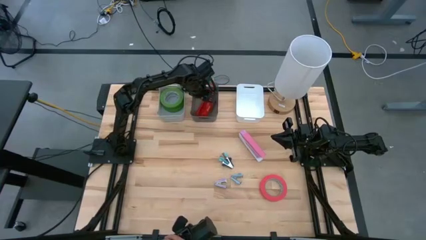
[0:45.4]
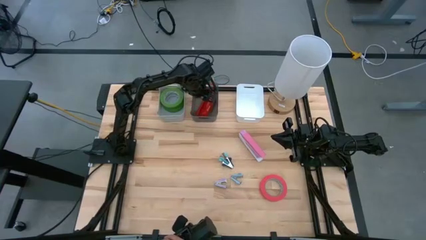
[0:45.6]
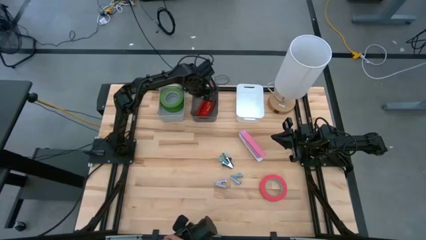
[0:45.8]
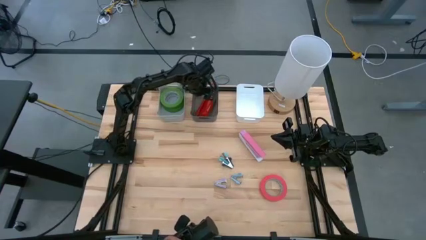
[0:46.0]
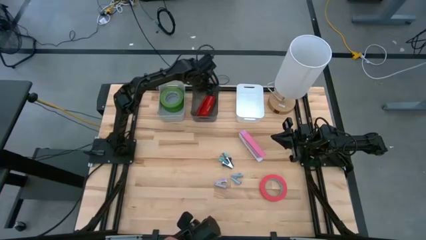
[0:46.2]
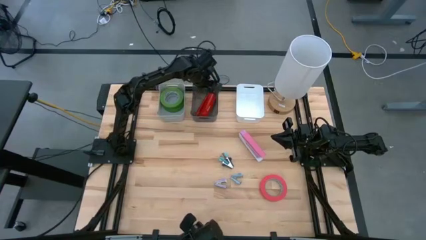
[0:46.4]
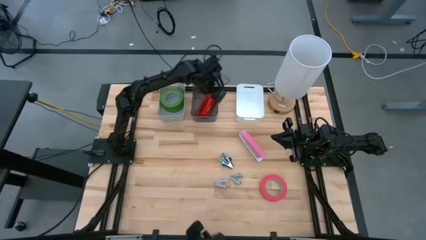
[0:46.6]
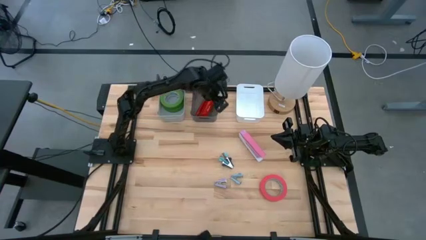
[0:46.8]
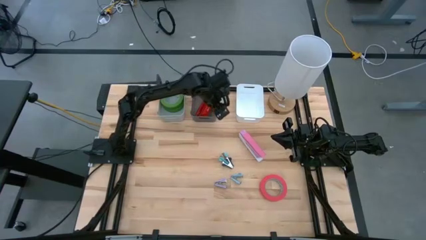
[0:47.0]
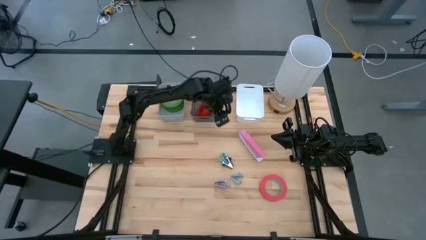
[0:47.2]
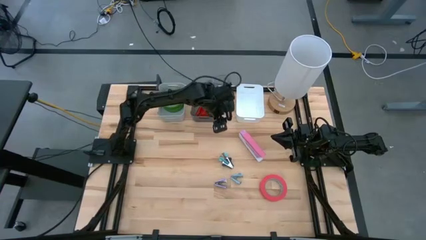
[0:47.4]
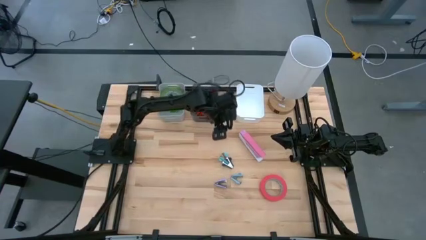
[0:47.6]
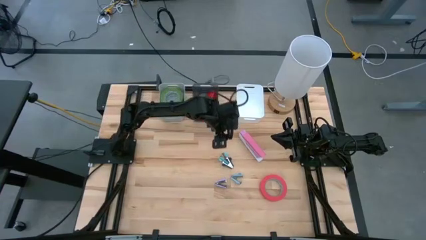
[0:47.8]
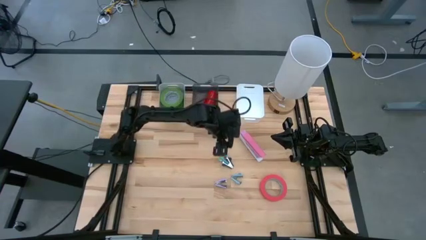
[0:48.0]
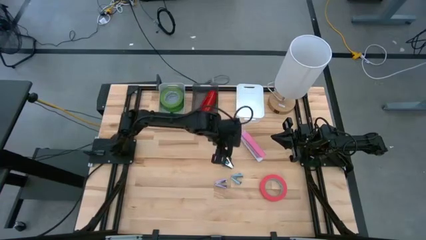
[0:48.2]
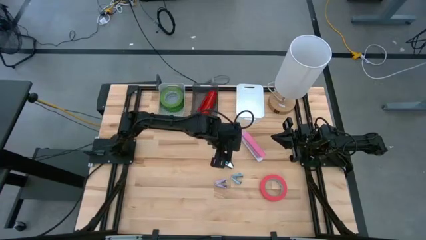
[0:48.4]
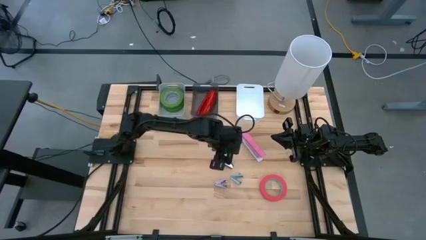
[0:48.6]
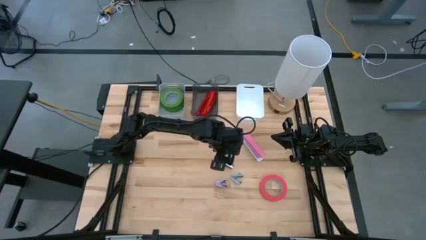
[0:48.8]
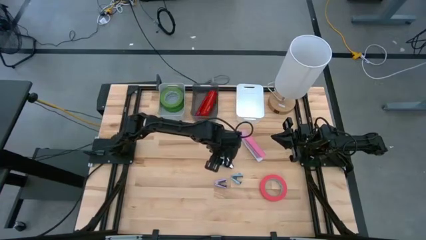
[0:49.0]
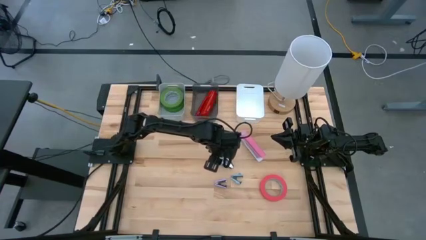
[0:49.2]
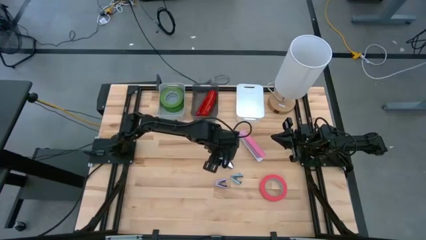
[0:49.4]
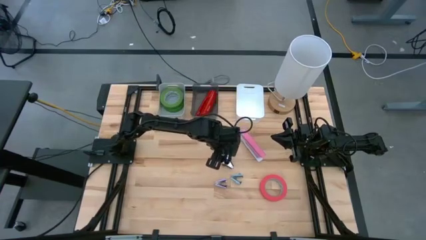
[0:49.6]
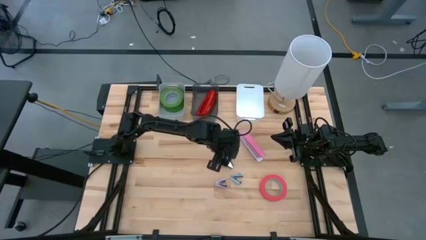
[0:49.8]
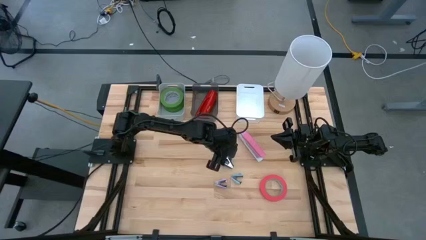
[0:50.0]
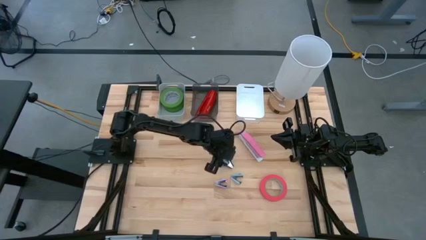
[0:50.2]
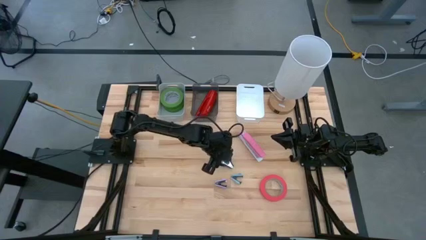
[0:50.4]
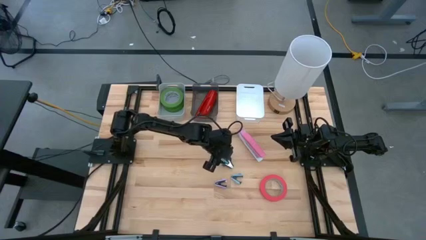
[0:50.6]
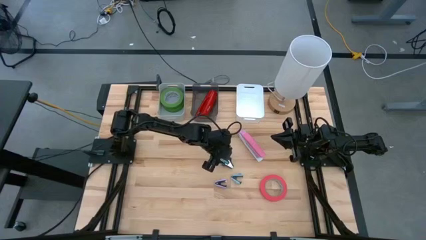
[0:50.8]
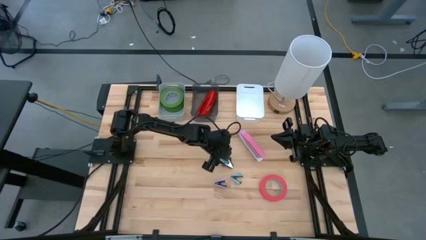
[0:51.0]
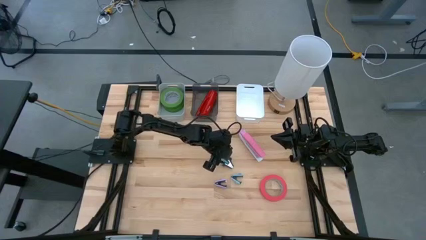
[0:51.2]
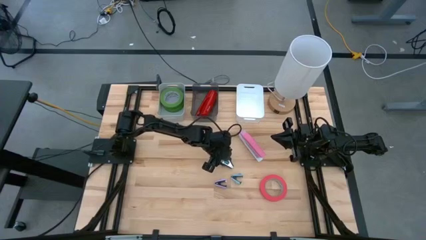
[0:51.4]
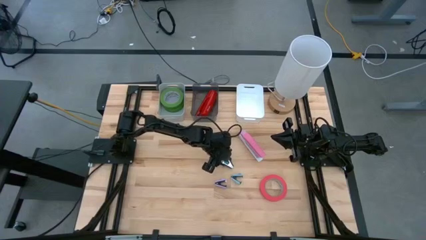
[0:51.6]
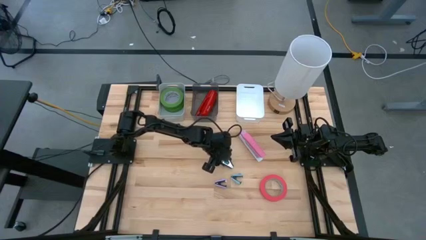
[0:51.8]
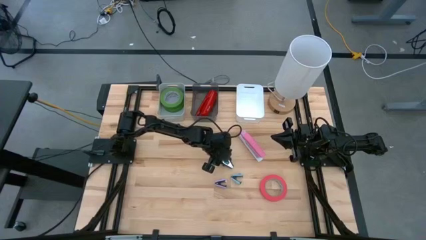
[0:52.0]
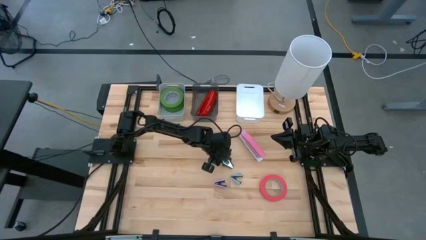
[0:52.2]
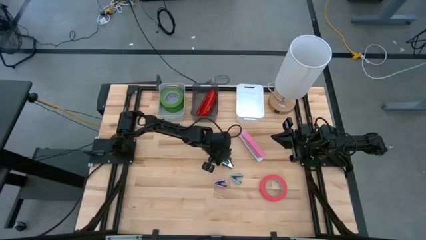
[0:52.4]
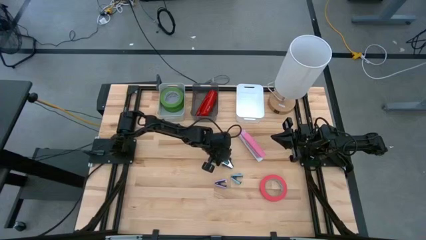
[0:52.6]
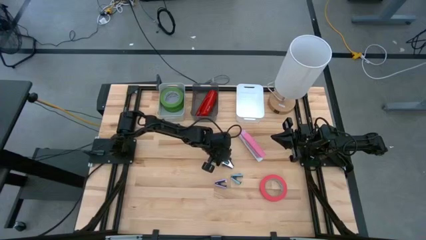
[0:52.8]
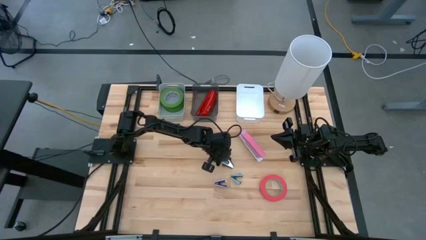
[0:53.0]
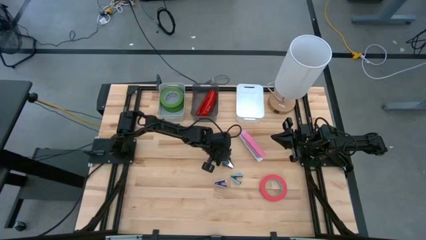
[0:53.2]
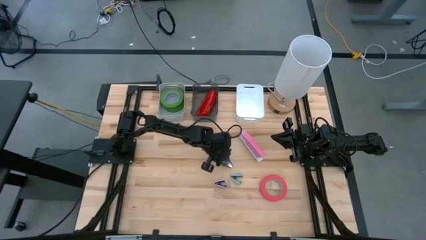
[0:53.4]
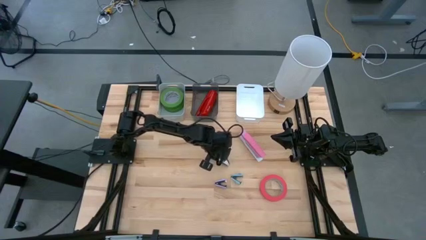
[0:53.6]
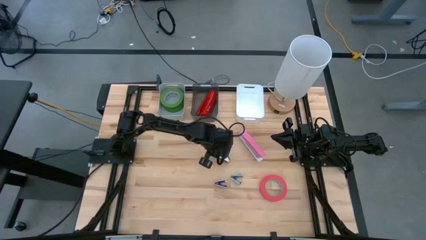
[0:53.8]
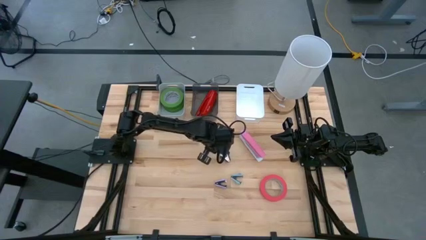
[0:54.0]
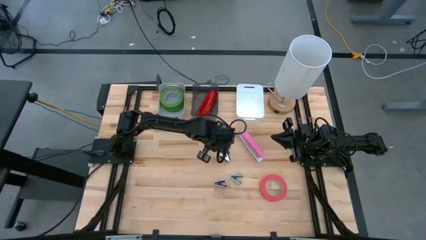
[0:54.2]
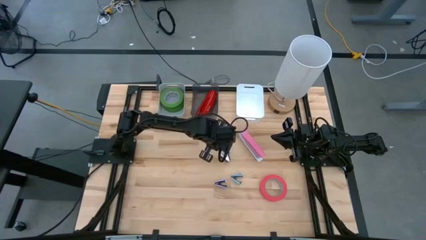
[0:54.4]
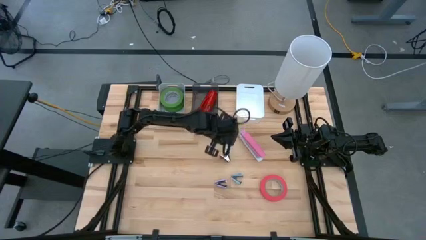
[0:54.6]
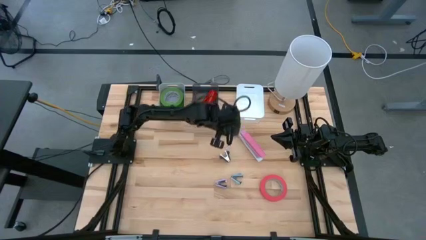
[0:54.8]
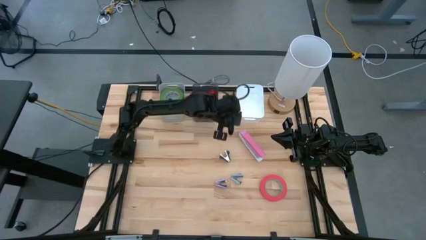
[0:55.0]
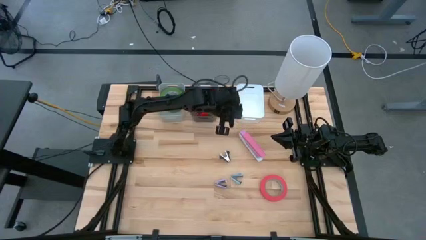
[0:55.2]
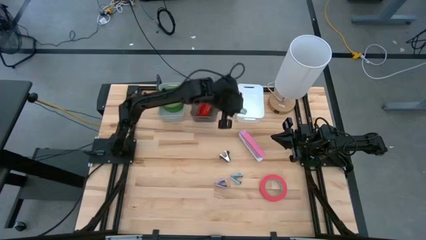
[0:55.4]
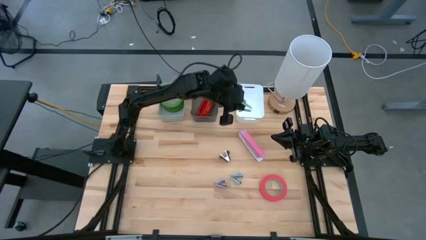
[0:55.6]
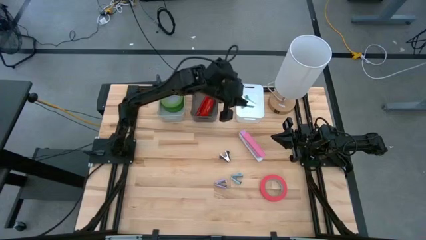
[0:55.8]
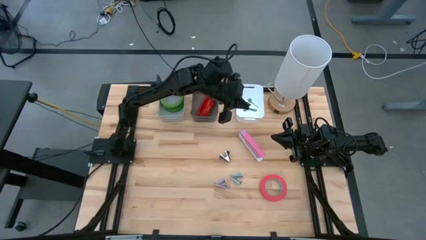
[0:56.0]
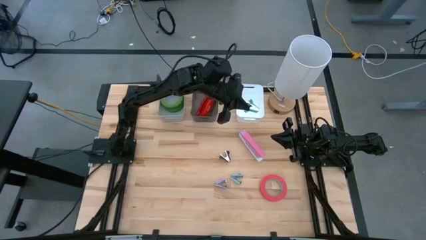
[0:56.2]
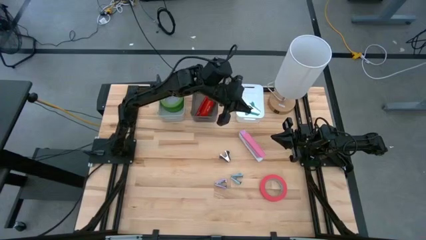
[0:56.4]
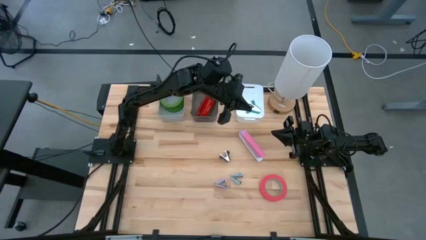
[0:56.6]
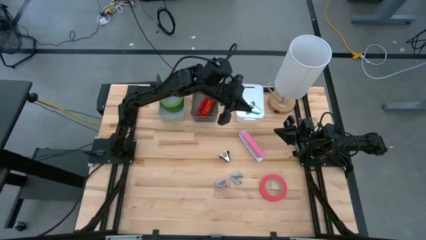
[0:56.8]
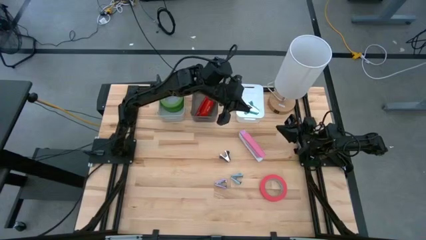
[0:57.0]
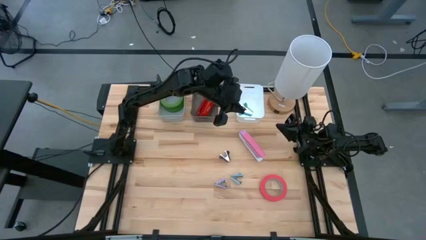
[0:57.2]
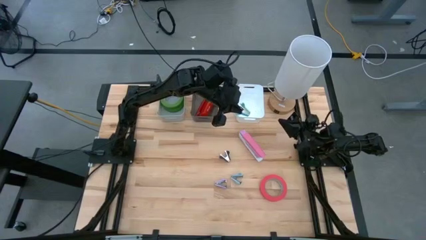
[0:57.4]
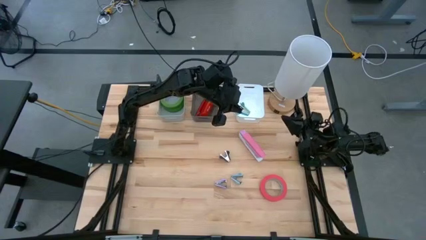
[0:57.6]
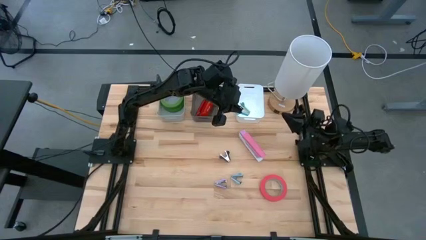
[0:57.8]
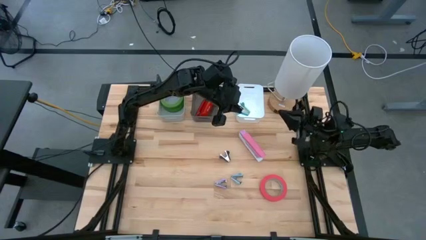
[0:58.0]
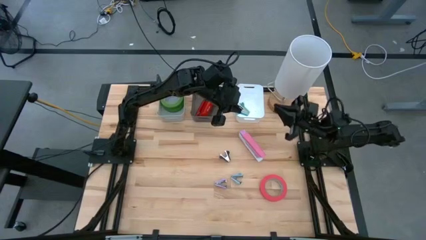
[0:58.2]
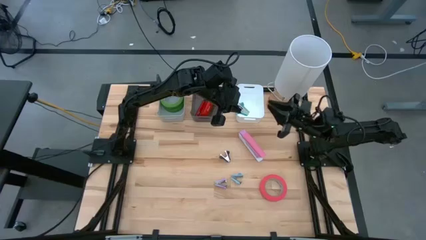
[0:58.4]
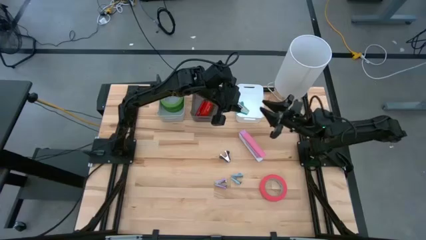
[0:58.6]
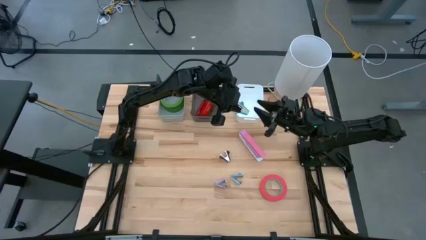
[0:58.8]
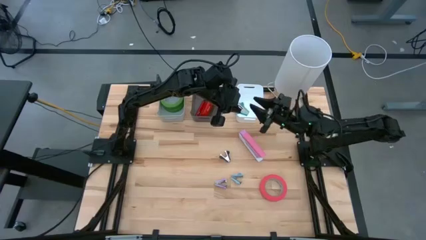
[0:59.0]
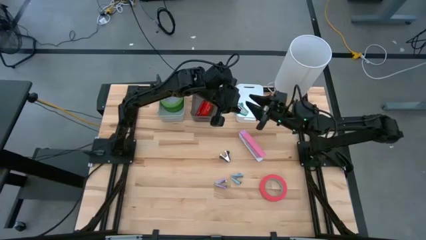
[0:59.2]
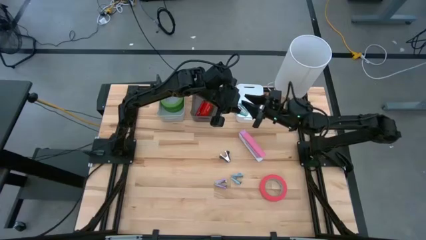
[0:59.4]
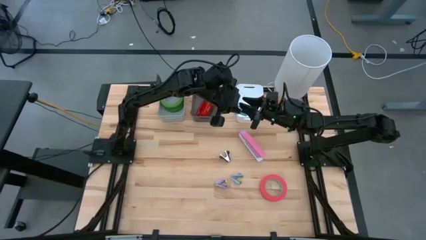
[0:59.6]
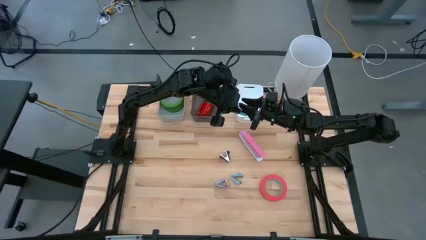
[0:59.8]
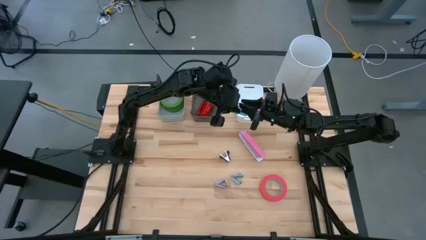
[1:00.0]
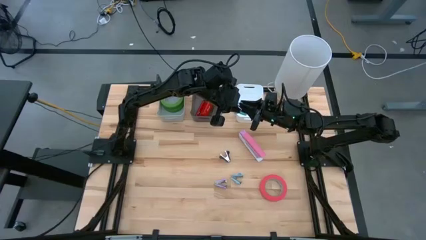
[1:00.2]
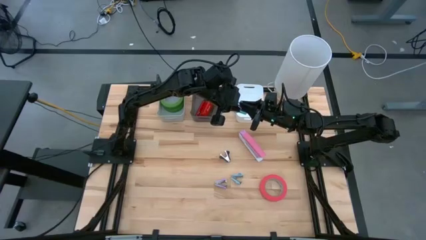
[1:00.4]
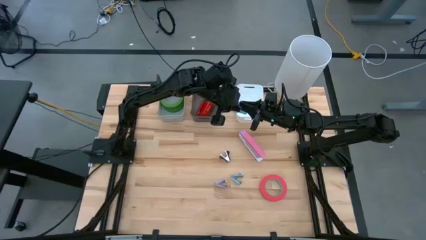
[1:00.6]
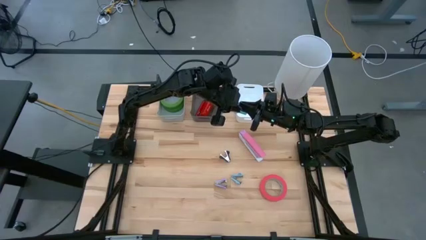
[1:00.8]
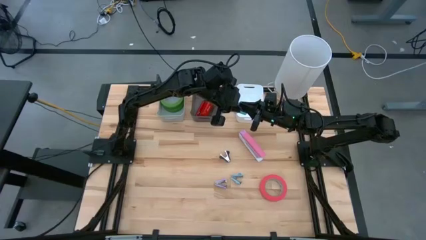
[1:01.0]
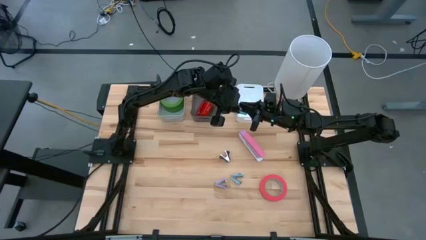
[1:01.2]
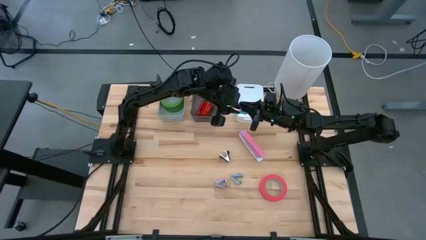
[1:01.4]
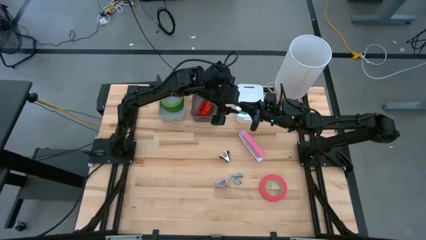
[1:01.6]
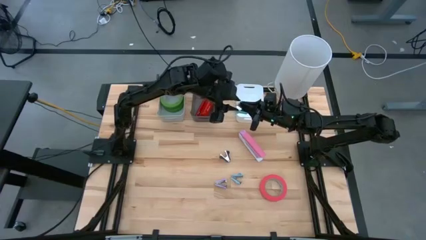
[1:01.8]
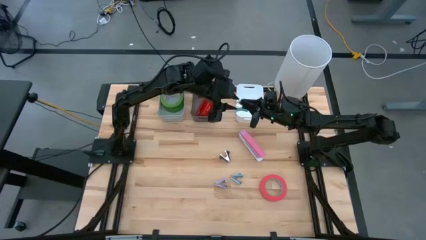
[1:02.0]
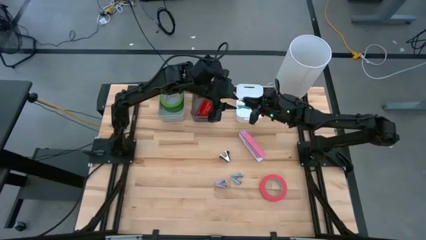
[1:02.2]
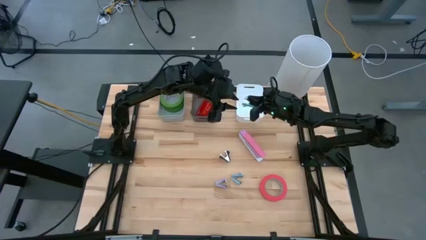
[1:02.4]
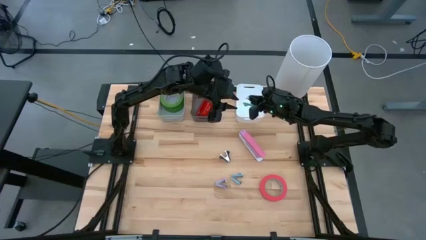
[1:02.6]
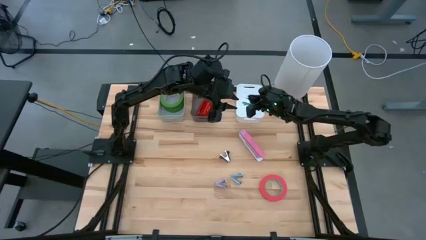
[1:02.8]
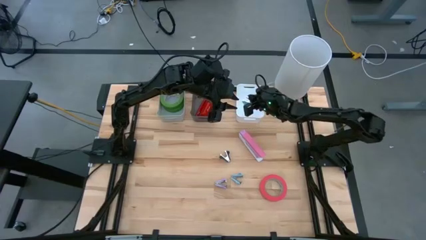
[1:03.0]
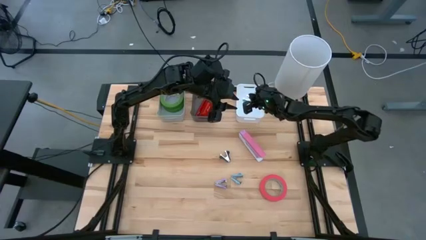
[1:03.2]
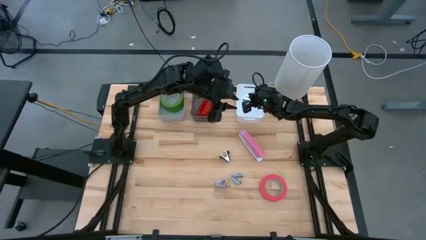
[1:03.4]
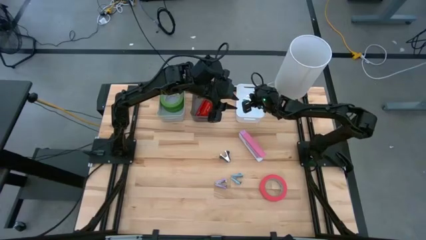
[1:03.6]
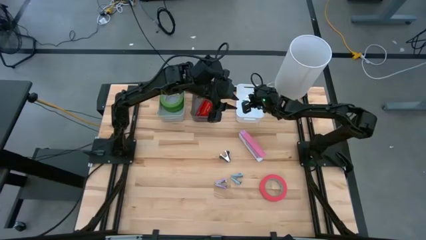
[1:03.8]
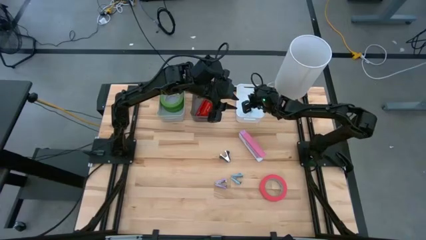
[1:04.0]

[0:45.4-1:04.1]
Task: Pick and place Stapler, Stapler remover, tape
Put the top light blue staple remover into the white bin
